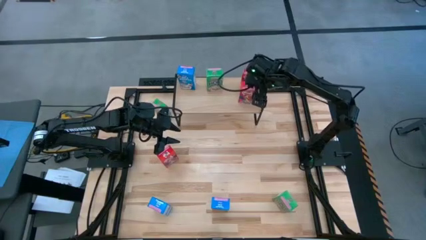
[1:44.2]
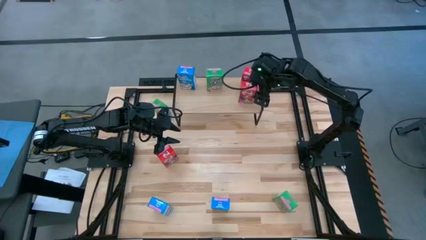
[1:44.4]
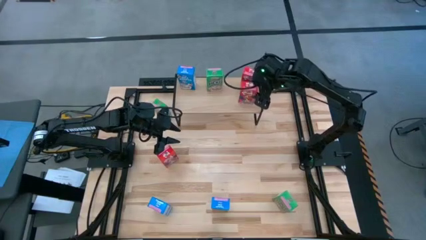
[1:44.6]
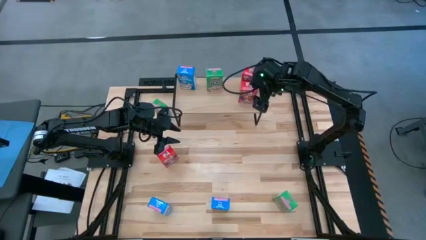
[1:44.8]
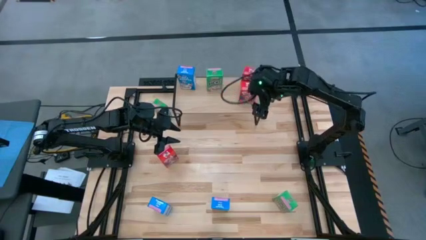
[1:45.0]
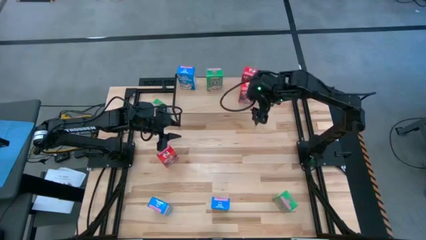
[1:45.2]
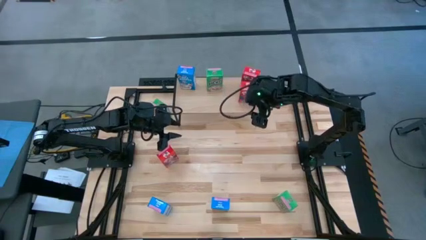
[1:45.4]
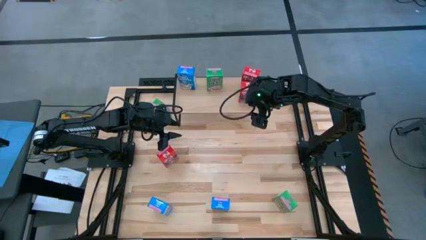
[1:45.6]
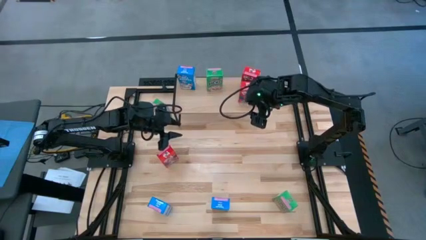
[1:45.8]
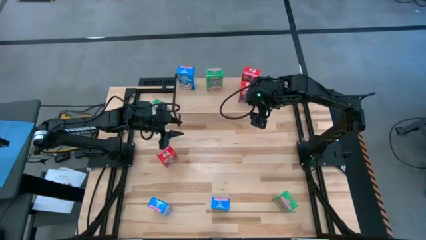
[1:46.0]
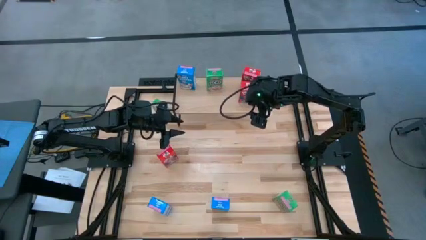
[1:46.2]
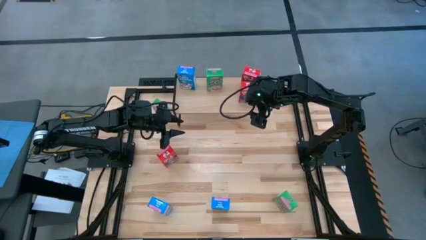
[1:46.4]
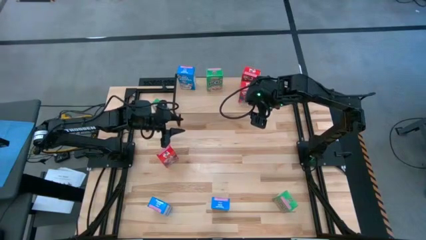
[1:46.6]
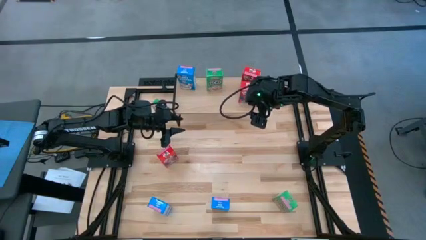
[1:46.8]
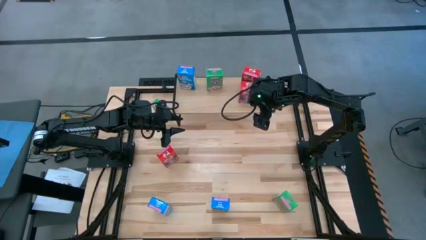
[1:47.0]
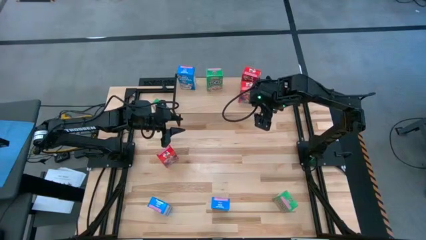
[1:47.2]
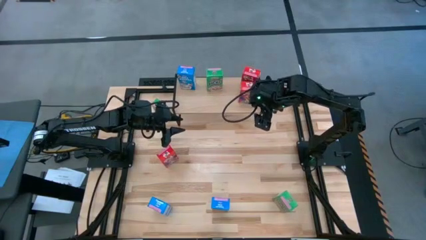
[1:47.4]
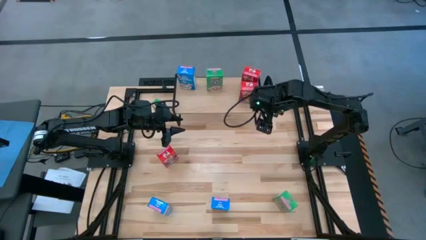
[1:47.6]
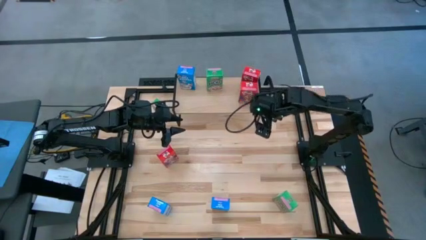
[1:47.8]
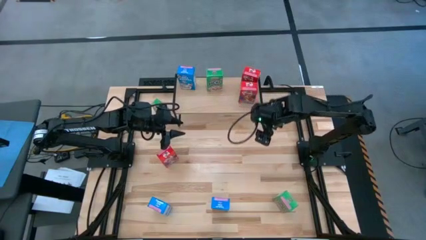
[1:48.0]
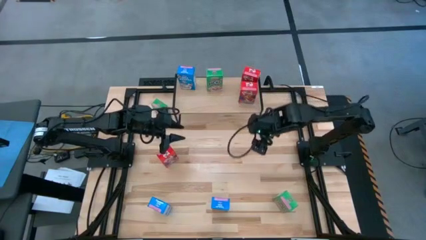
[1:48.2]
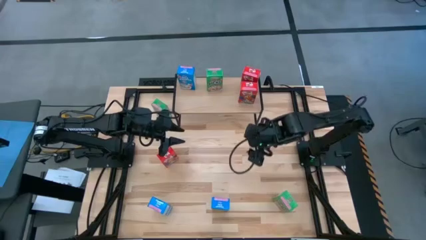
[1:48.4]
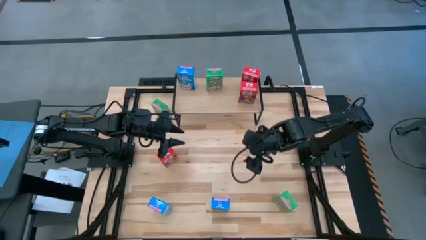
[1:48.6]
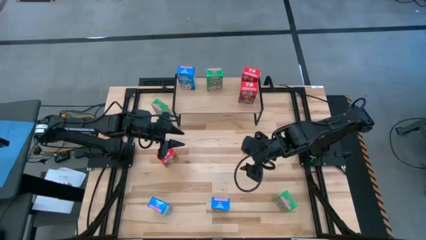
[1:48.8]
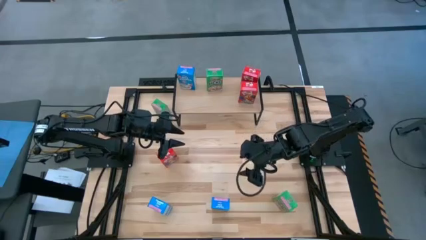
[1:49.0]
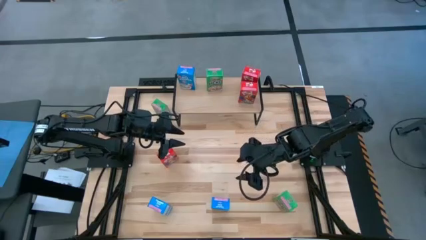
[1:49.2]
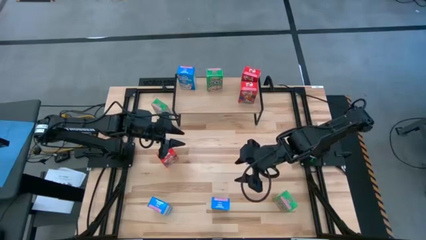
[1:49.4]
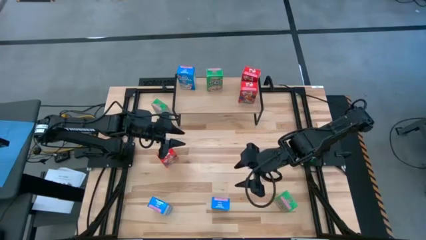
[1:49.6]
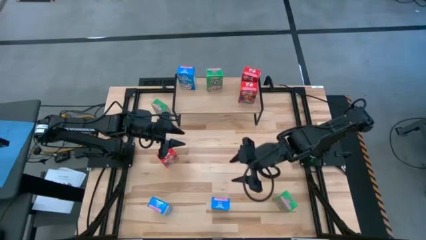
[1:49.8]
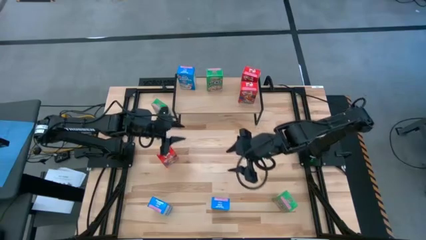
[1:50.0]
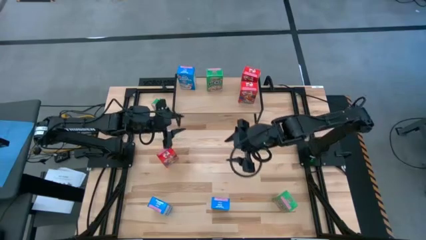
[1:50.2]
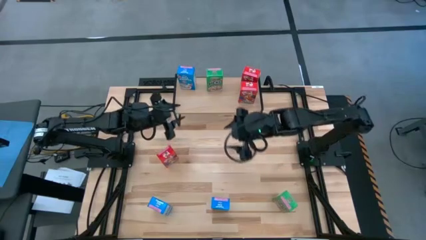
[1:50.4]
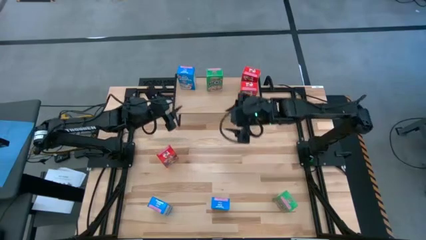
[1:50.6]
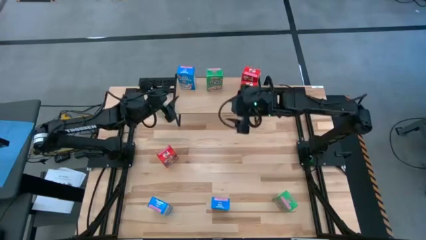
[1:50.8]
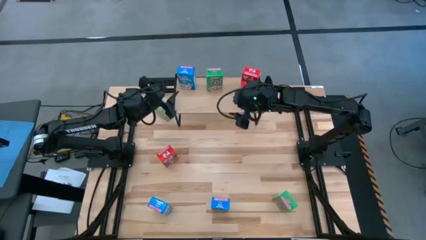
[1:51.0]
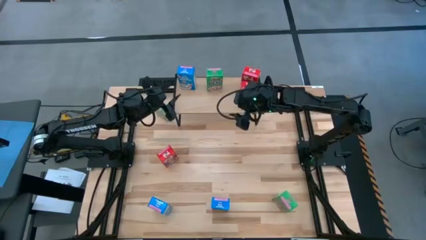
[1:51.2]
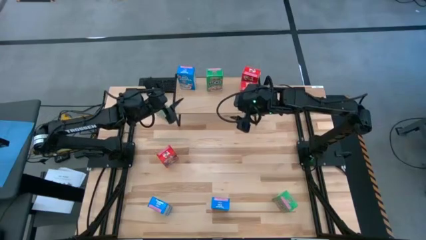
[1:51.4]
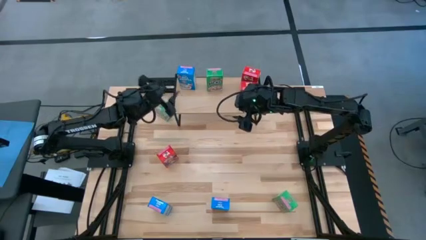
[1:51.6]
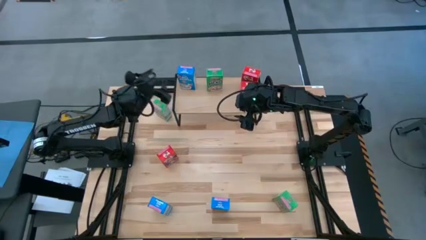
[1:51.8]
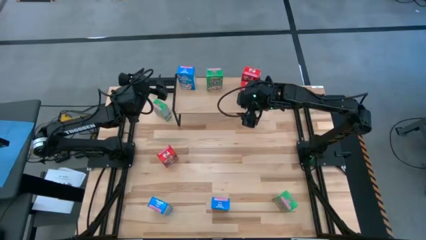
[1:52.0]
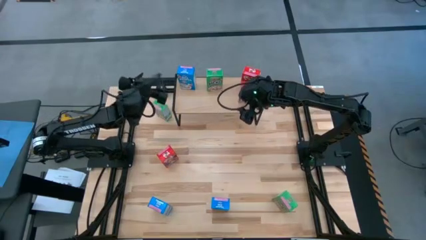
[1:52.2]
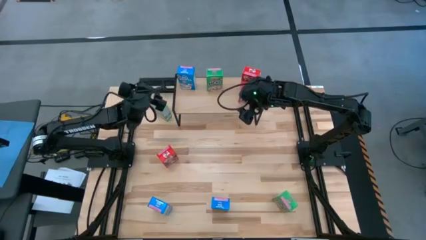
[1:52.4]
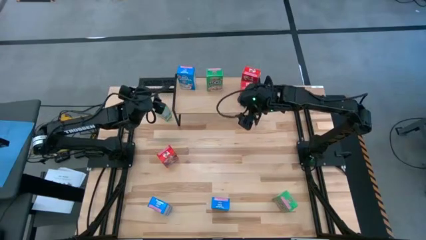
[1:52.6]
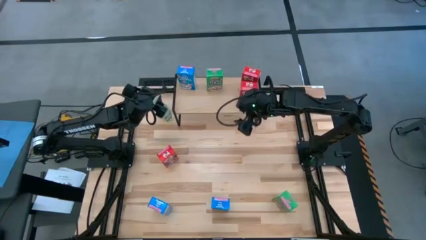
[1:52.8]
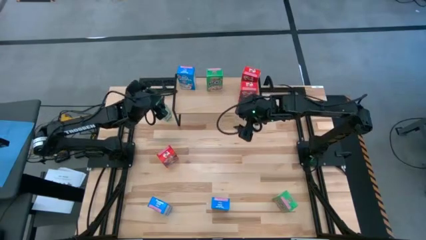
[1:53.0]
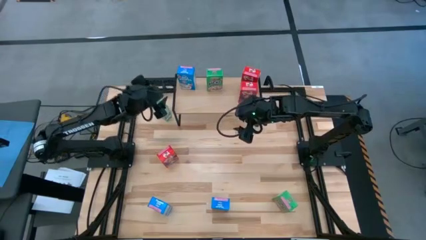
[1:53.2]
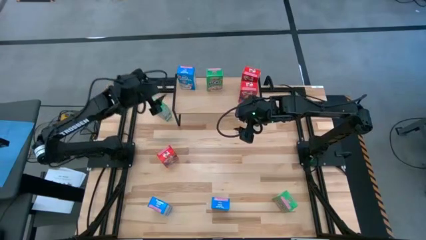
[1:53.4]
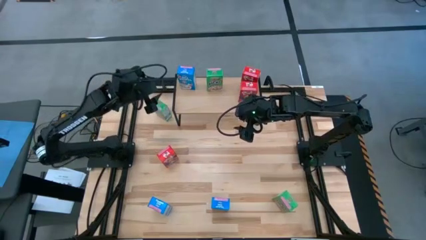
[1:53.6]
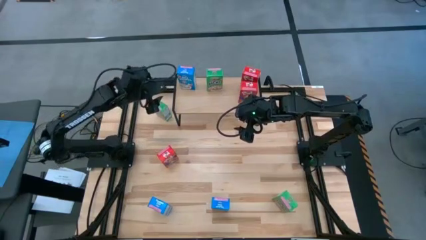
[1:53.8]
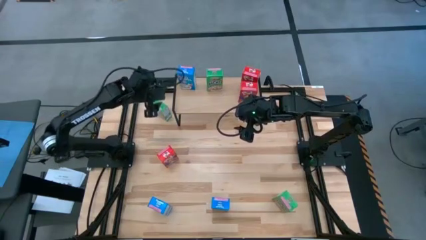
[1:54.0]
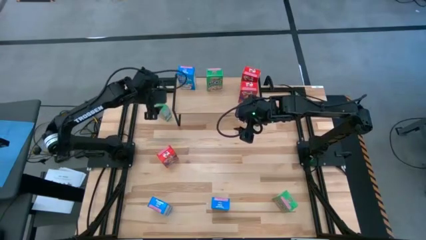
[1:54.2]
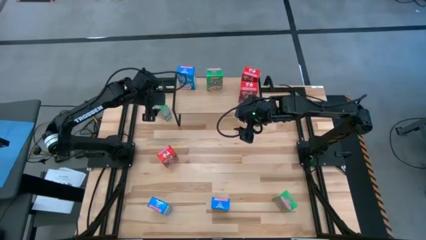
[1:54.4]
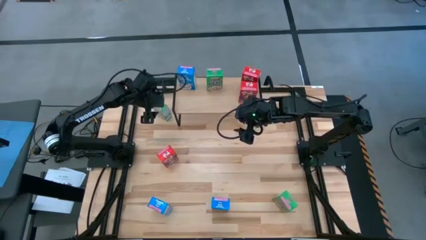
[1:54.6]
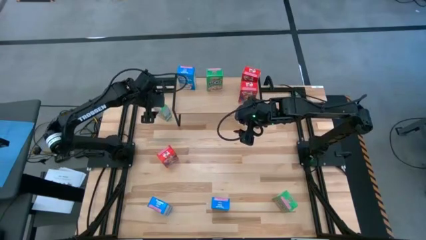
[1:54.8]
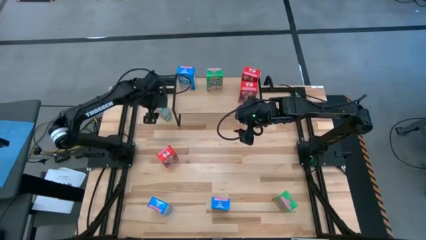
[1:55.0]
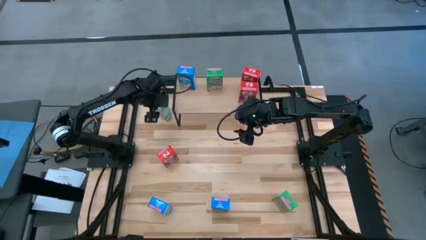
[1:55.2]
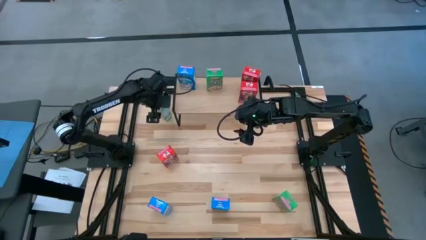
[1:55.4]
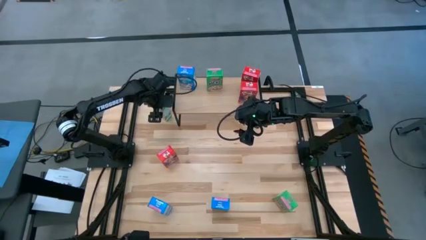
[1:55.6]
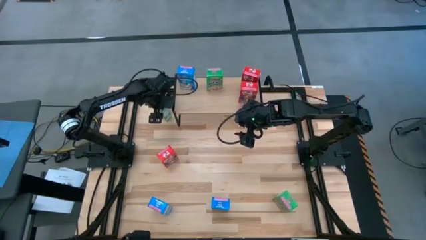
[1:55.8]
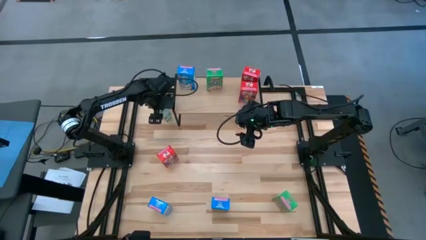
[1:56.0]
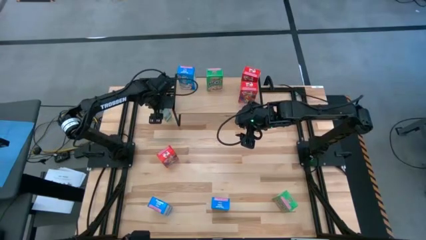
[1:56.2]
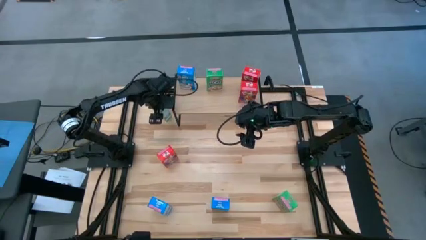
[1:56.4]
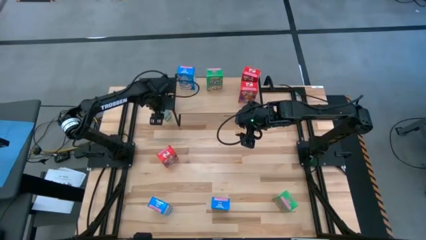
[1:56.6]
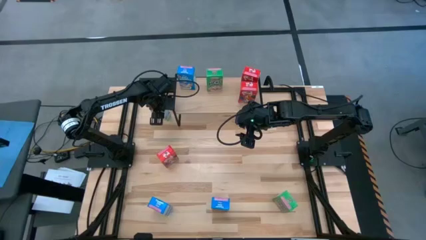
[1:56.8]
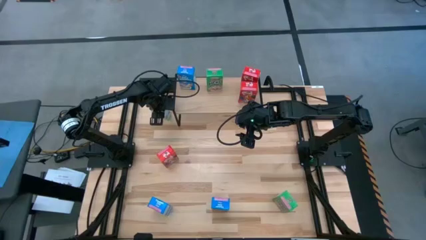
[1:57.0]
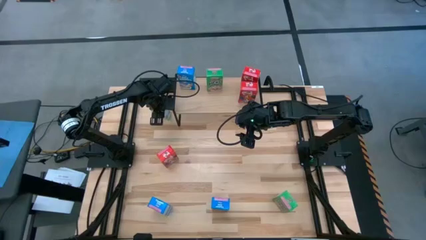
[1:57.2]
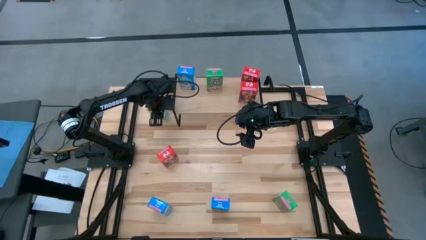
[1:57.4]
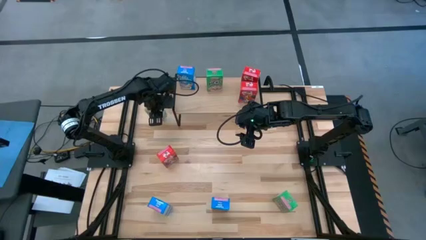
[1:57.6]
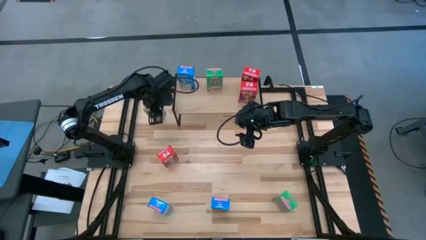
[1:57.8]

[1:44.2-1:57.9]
Task: Stack cereal on shelf
Put the top green cereal box on the shelf aligned with the green cereal box

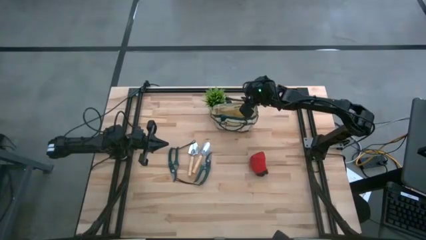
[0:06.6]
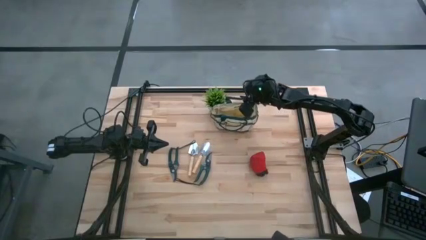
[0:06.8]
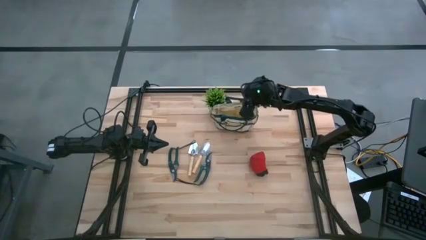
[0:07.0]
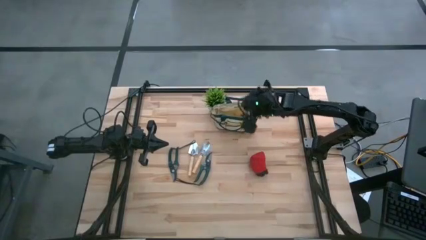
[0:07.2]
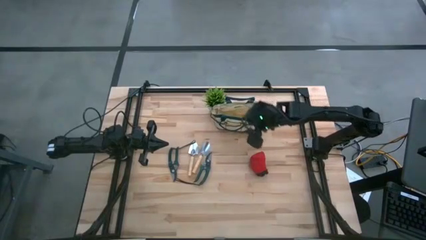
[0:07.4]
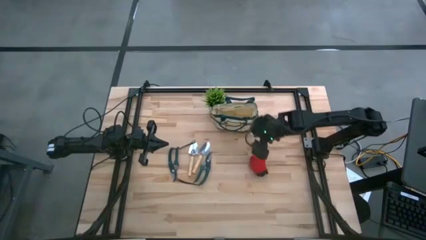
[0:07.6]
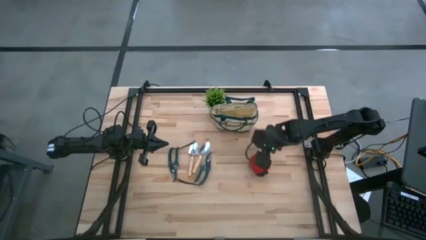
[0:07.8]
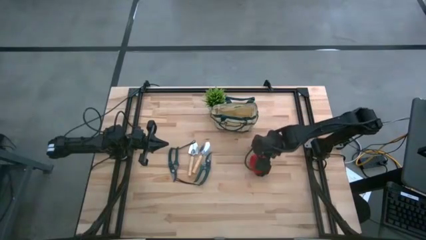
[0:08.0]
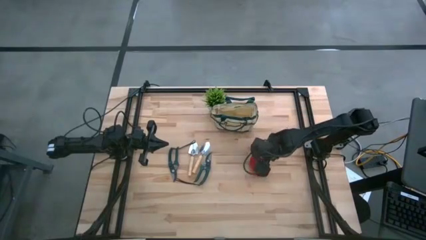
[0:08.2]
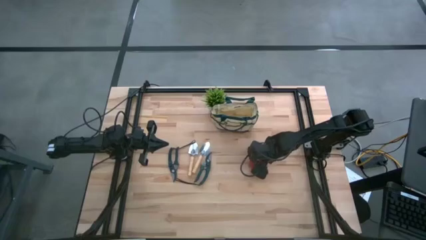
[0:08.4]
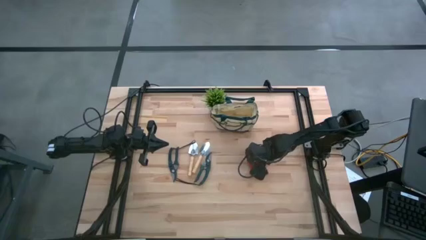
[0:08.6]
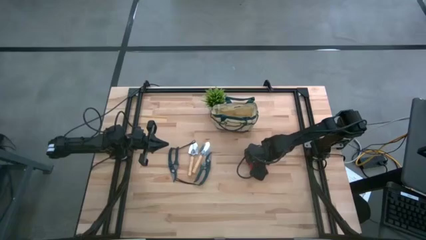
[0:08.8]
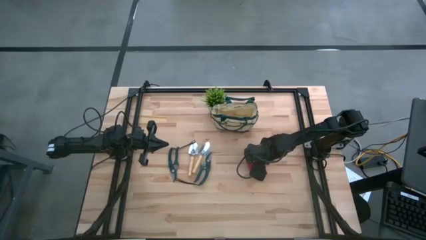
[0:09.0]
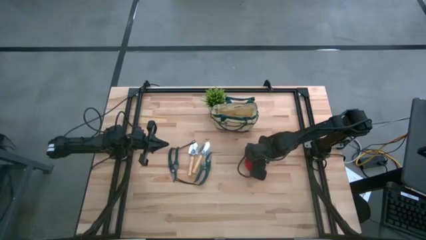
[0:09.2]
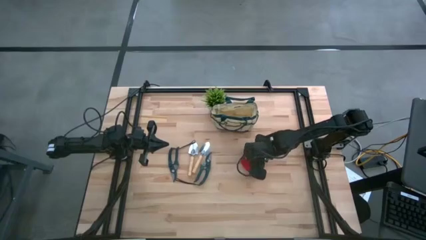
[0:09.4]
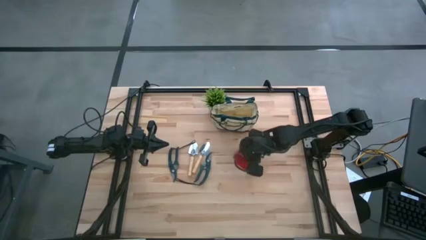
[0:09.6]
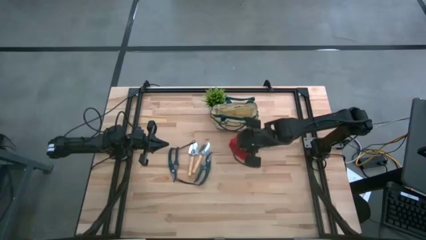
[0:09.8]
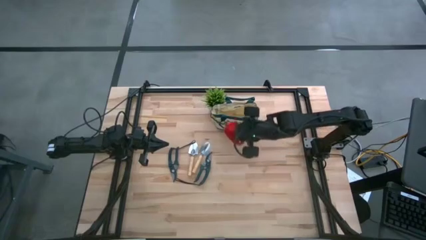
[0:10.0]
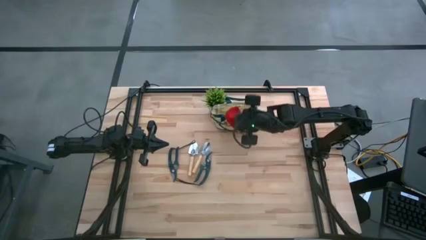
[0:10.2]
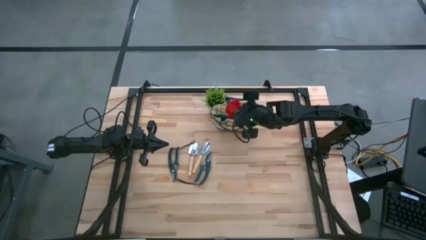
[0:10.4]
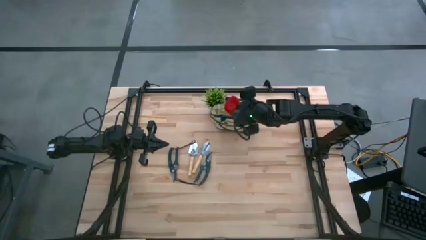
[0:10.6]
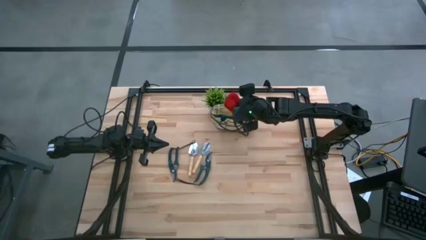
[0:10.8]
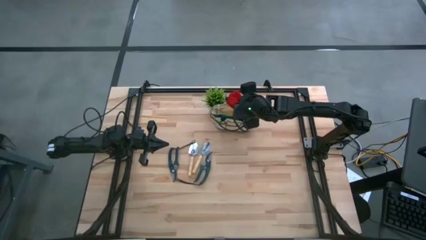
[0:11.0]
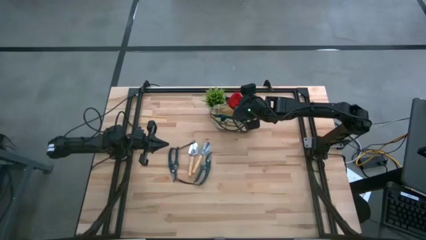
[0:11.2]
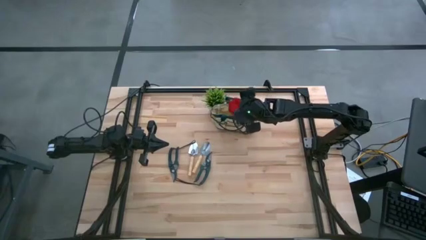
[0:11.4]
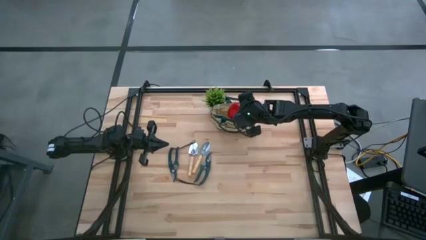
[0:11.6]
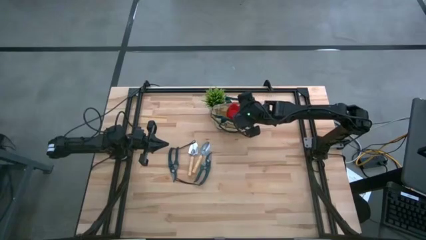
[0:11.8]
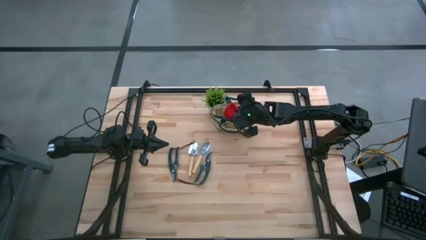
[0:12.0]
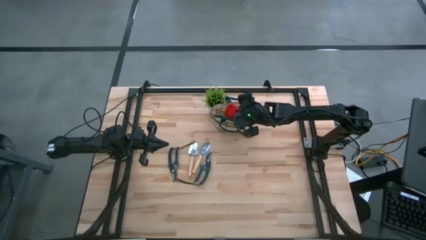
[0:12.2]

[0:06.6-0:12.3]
Task: Pick & Place Garden tools in Gardening bag
Put the red gloves into the gardening bag
